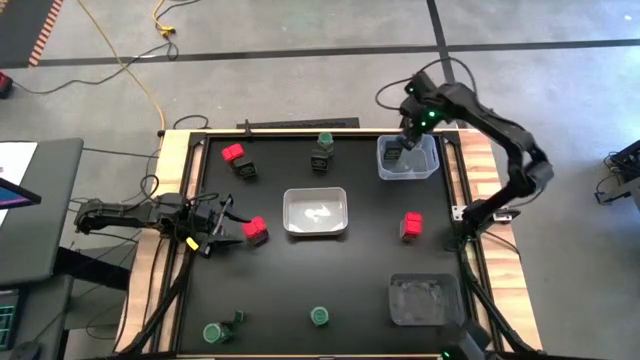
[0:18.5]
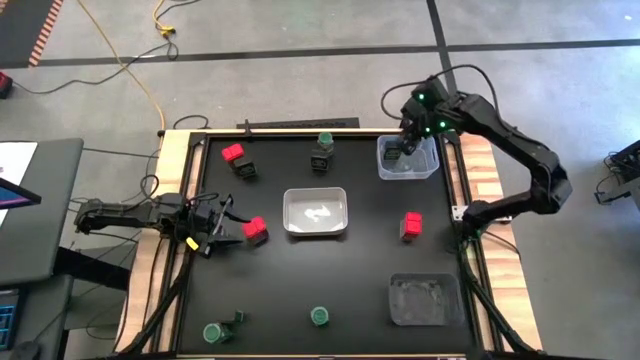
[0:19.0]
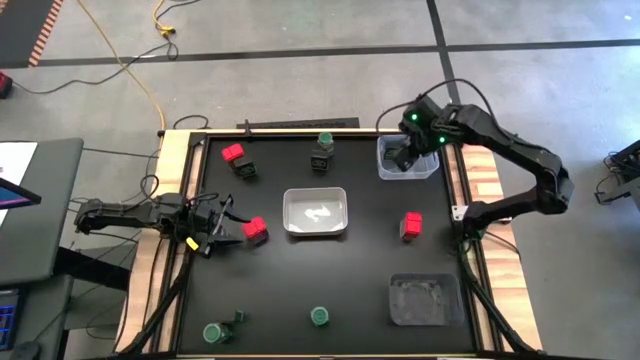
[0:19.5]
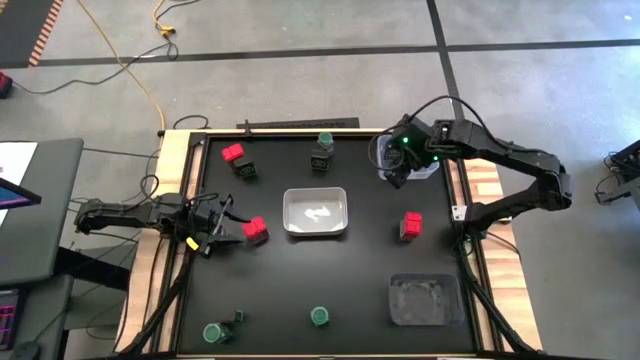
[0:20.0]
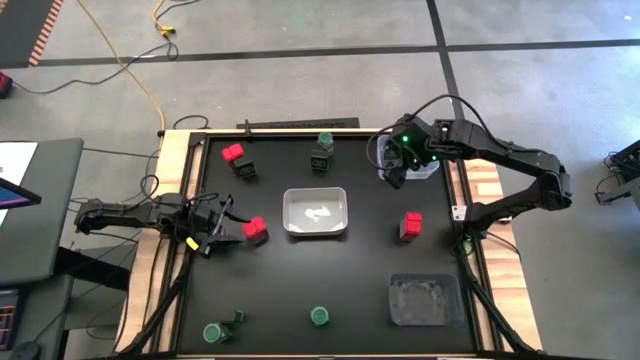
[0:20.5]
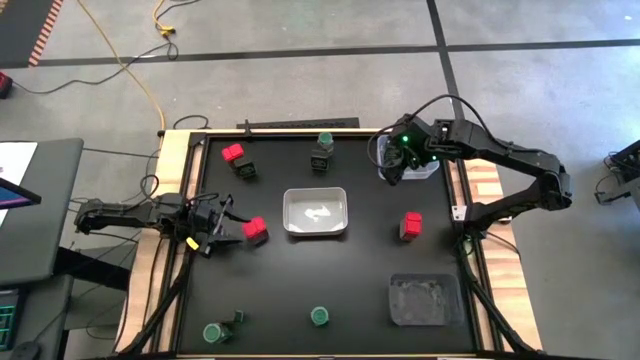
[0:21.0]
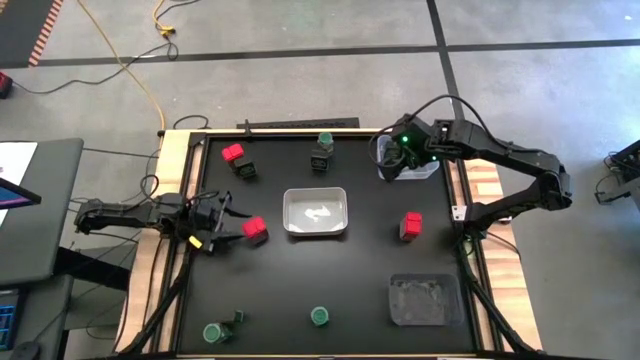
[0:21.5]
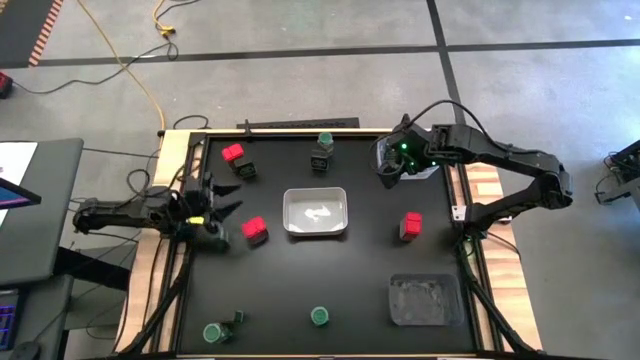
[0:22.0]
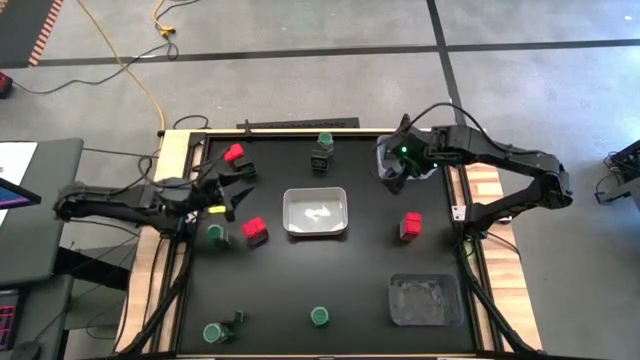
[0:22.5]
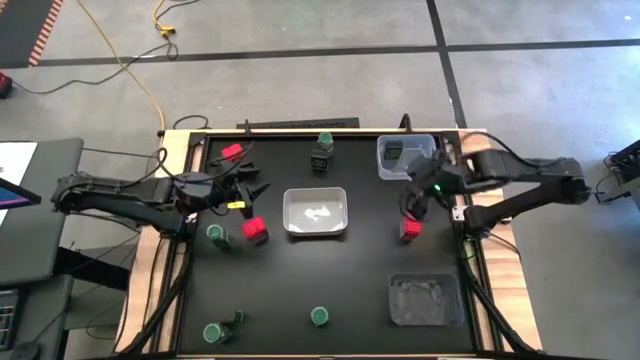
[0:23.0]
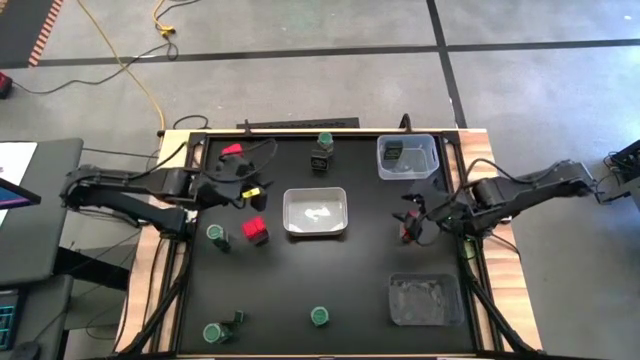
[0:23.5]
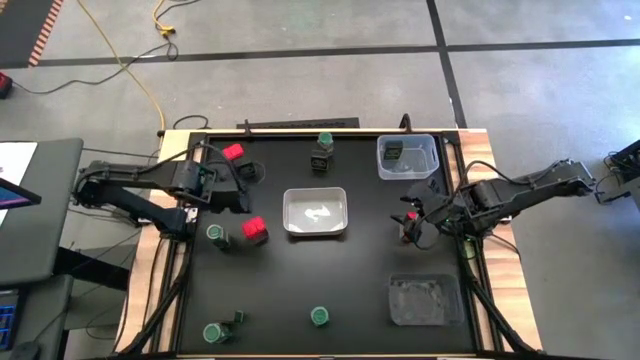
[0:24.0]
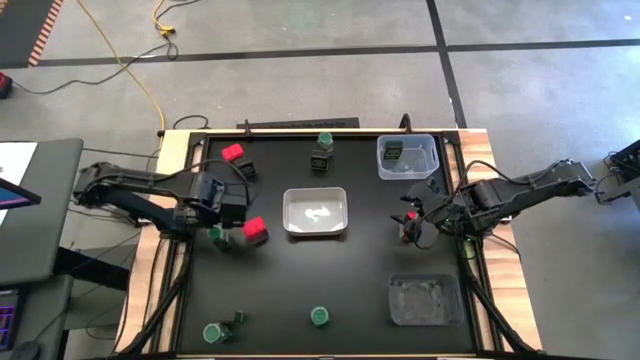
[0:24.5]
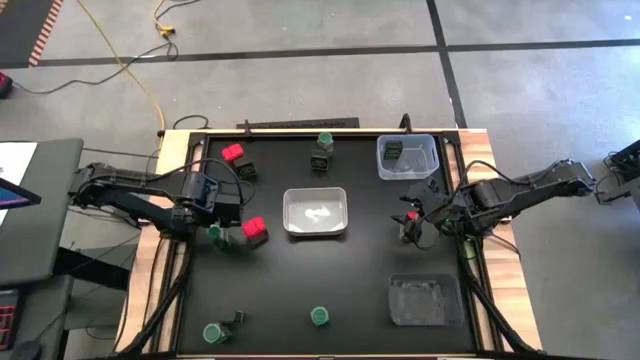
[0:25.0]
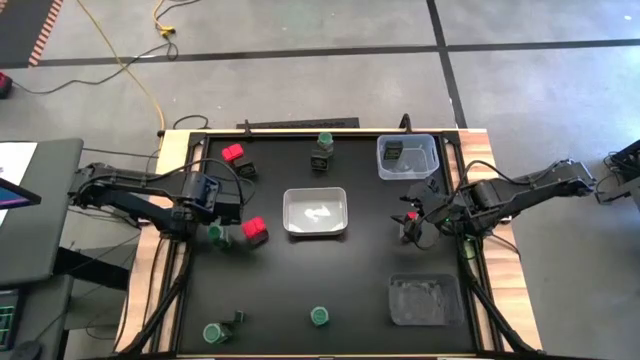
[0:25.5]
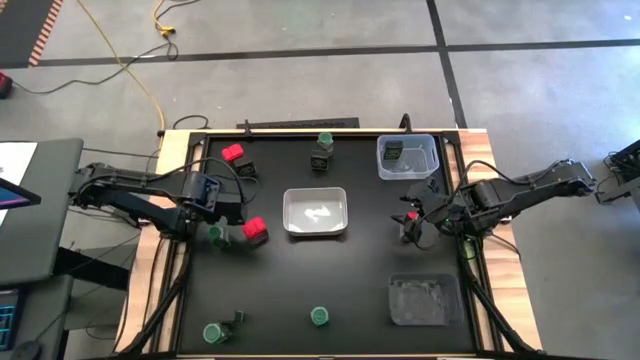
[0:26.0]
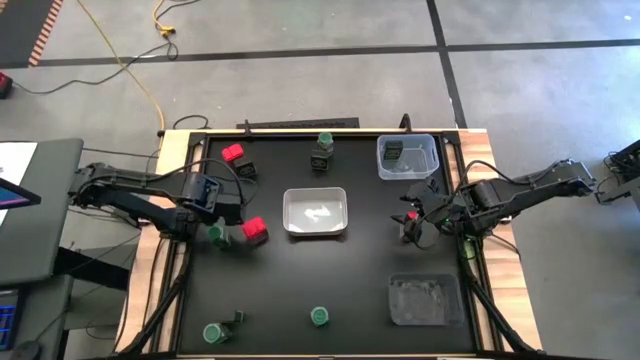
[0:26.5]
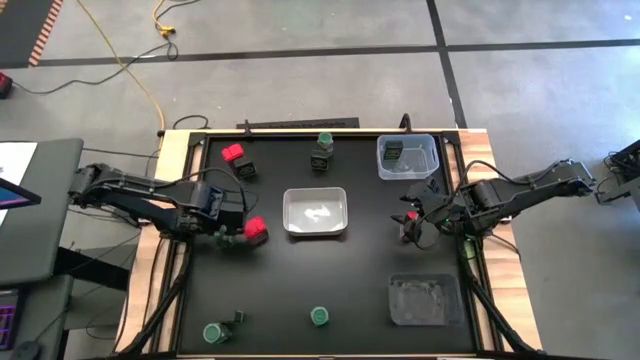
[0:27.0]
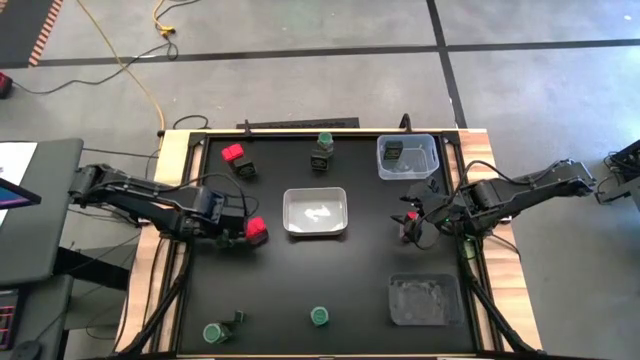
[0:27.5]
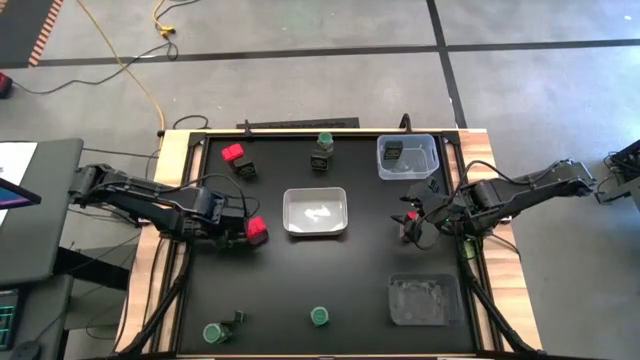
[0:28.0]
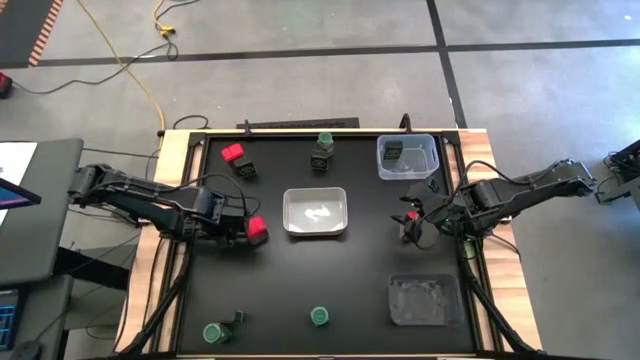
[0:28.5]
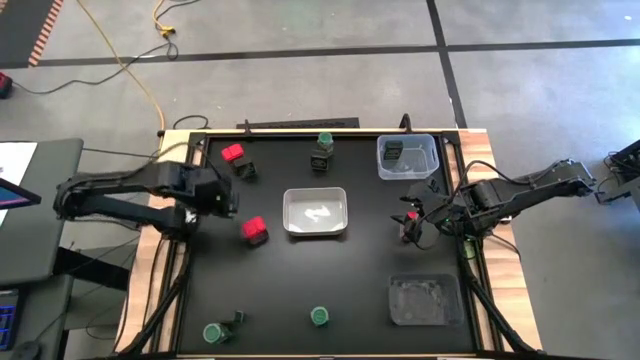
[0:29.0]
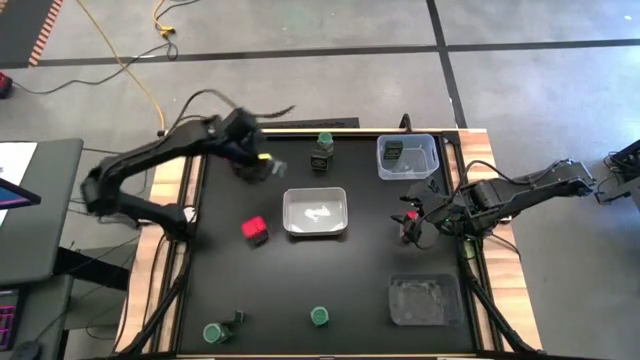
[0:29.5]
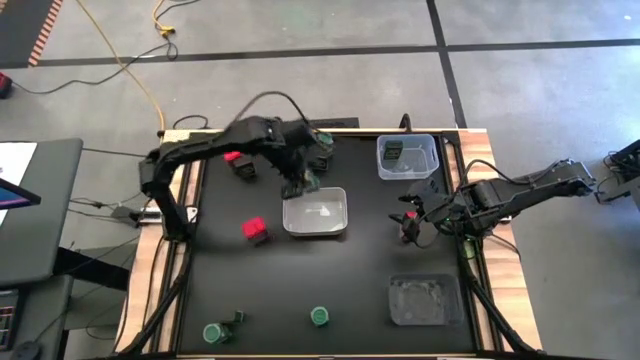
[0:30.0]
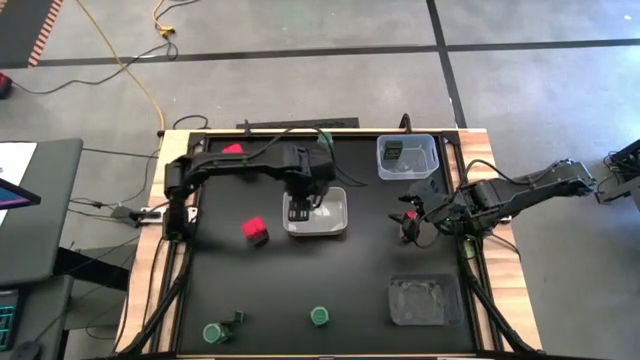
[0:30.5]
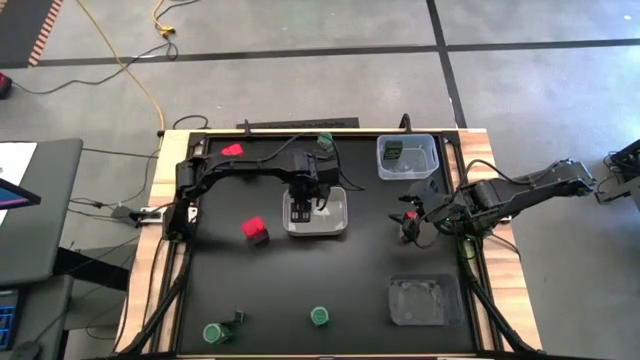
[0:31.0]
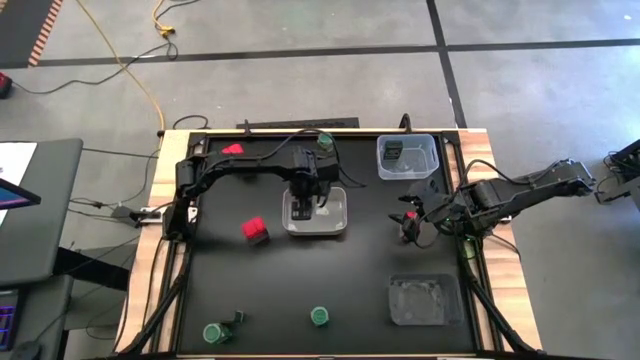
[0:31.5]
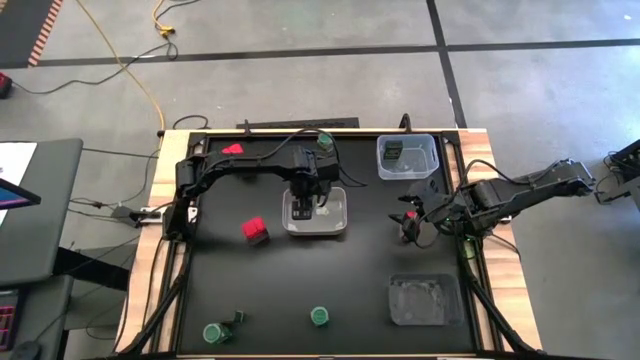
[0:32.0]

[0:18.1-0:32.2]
Task: Sort spices by type
Put the middle left green seasoning bottle into the white bin

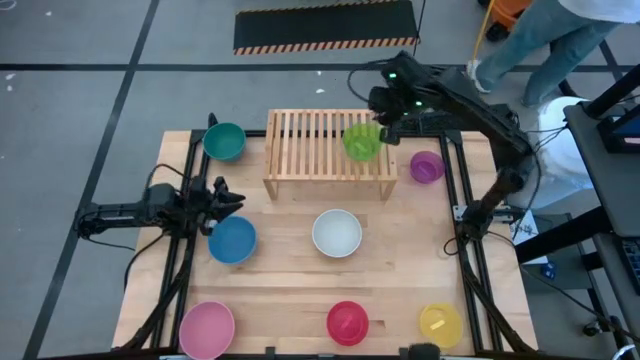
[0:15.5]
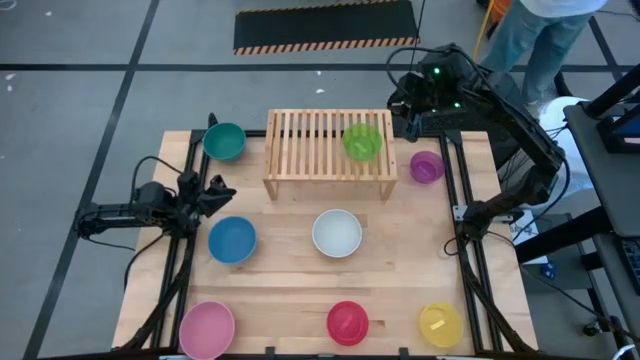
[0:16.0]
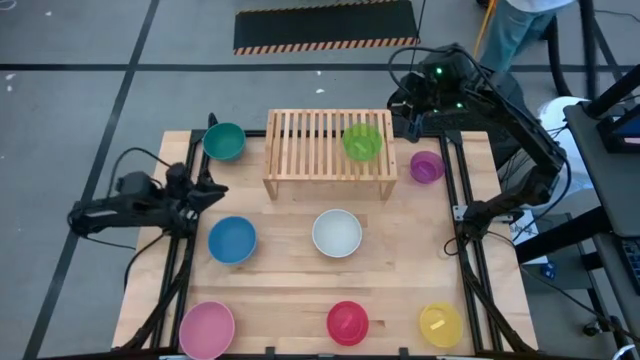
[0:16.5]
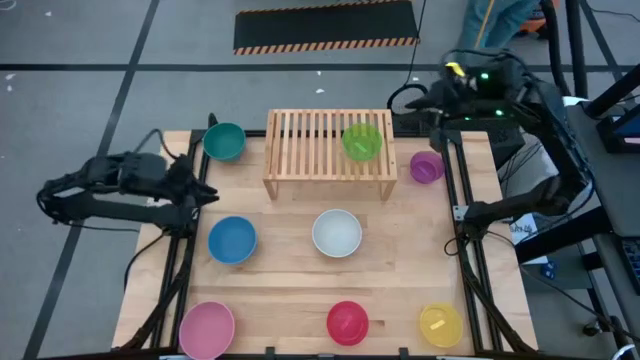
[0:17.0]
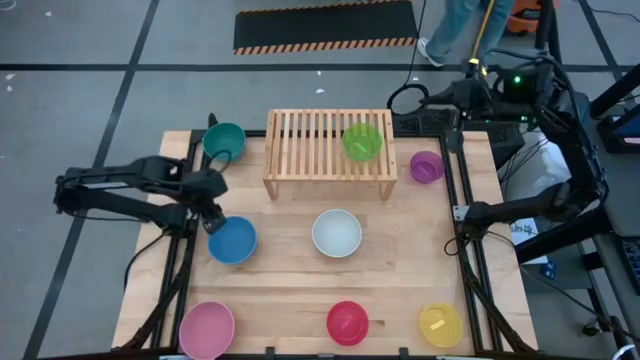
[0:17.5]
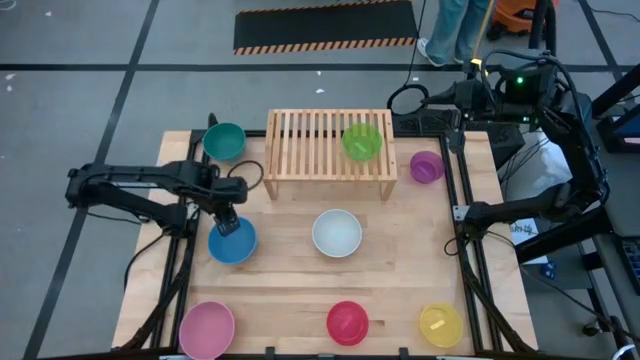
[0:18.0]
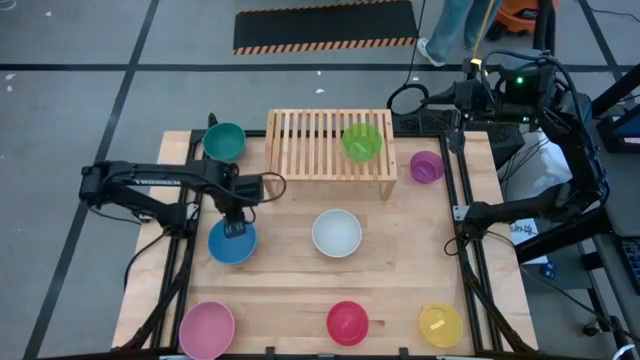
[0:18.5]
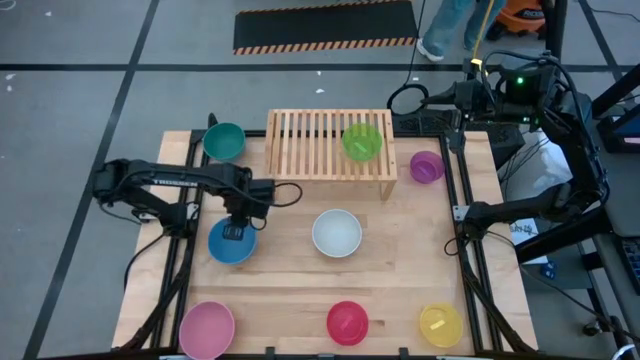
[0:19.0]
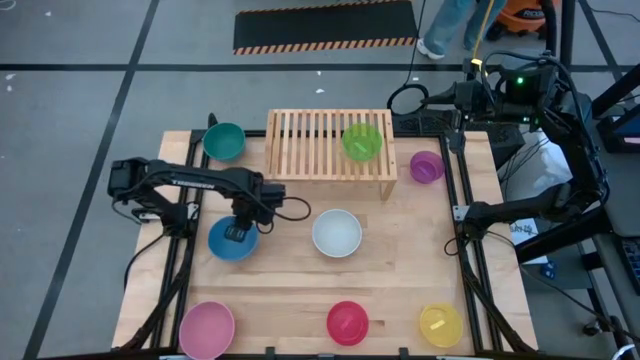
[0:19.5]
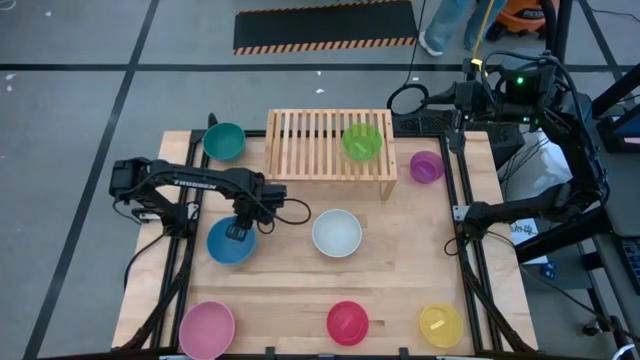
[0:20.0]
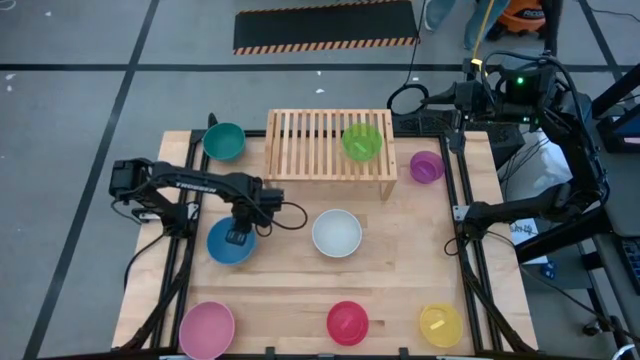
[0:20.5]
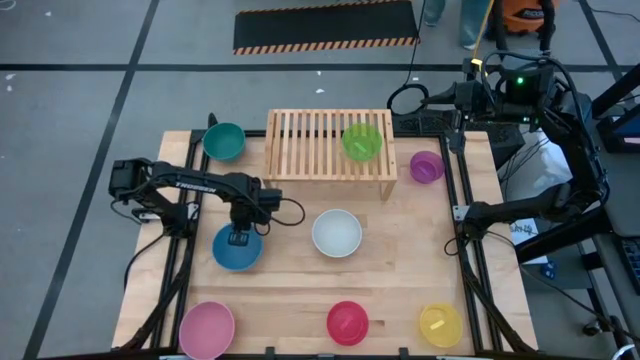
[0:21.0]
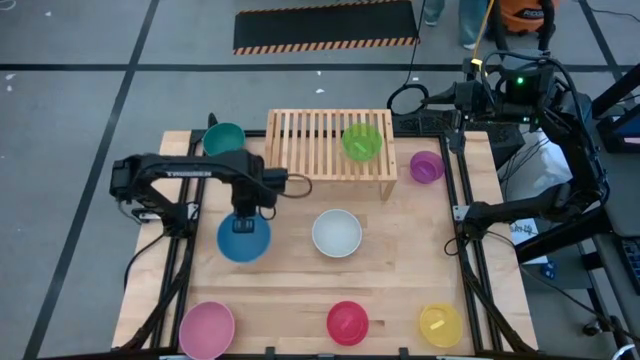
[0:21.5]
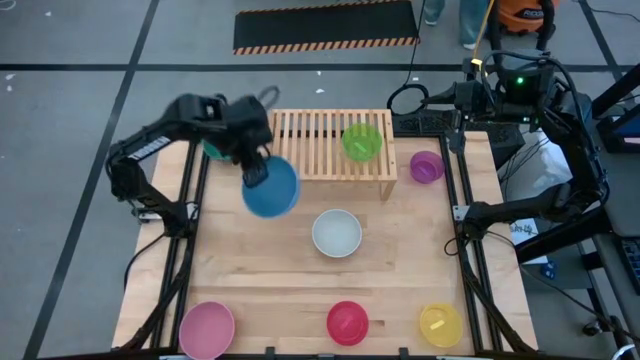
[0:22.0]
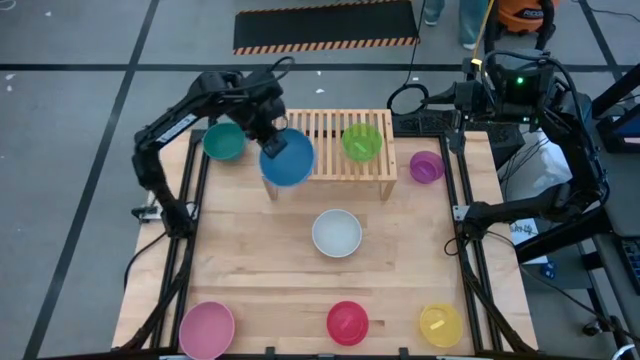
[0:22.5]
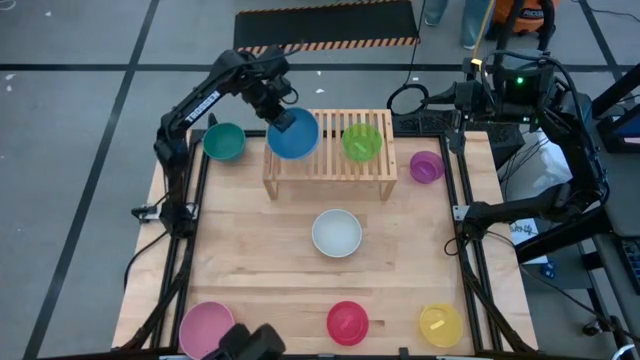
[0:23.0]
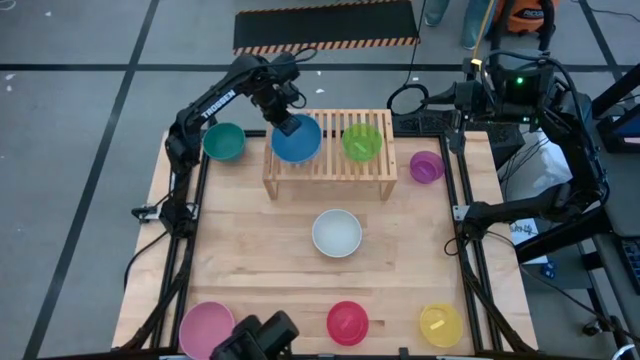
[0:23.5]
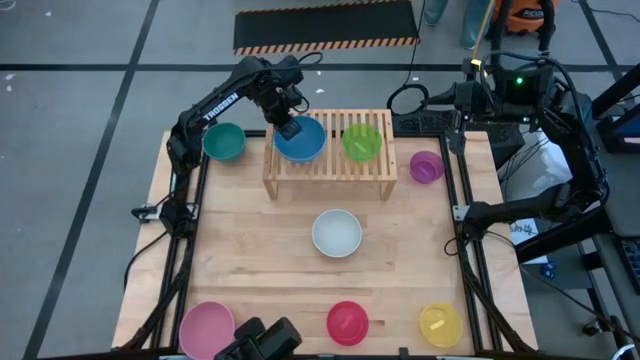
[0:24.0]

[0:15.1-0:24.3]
Task: Place and stack bowls onto a shelf
Put the blue bowl on the shelf
